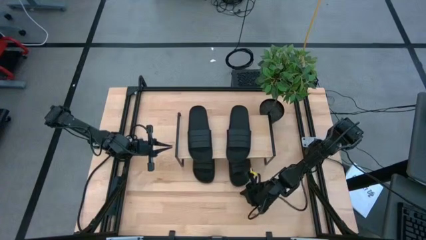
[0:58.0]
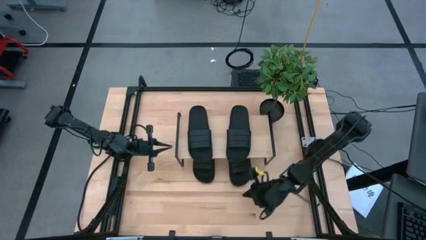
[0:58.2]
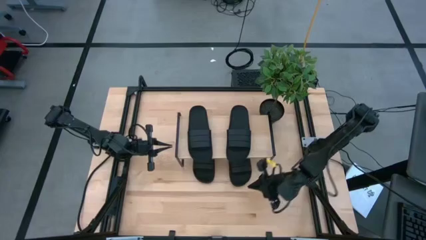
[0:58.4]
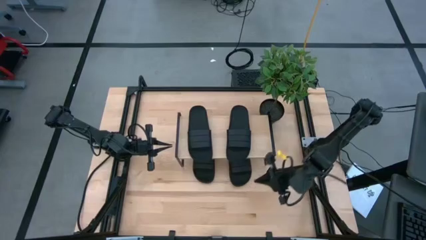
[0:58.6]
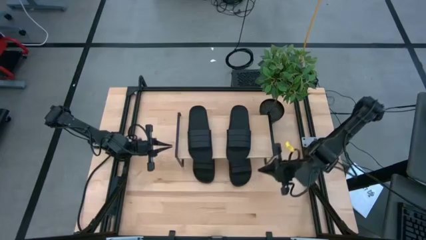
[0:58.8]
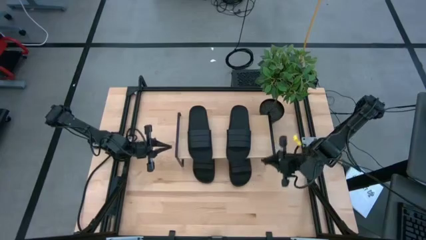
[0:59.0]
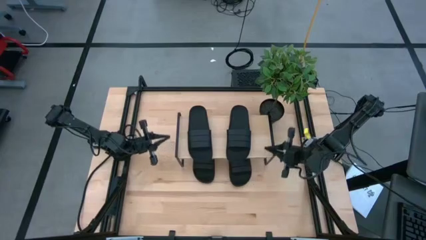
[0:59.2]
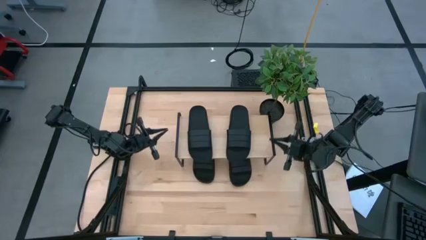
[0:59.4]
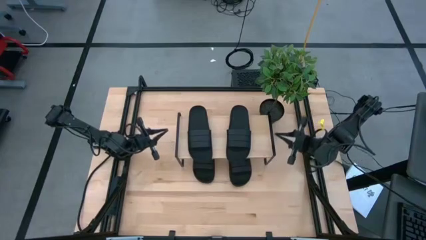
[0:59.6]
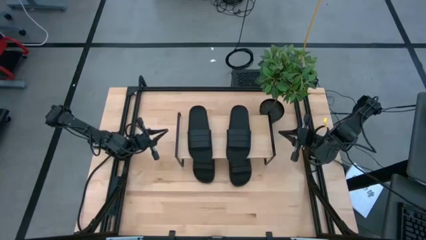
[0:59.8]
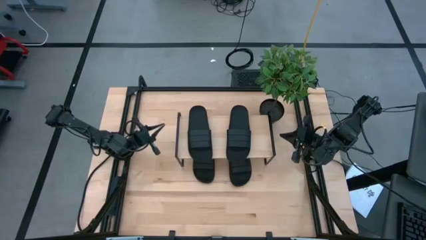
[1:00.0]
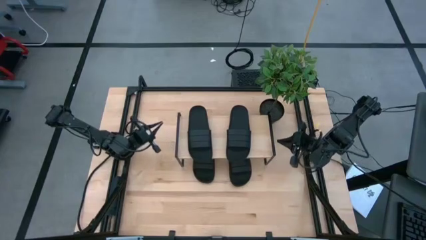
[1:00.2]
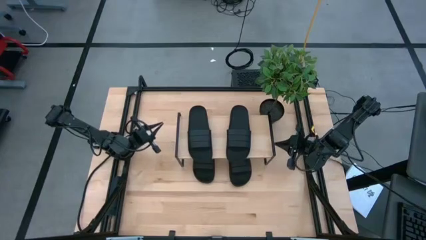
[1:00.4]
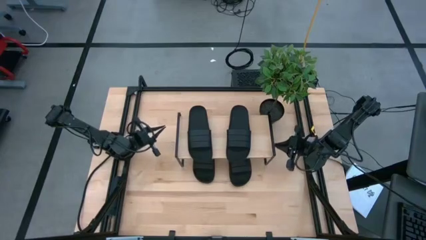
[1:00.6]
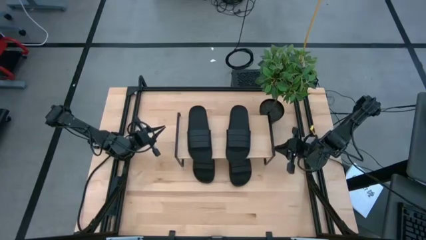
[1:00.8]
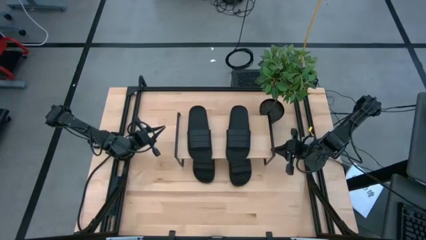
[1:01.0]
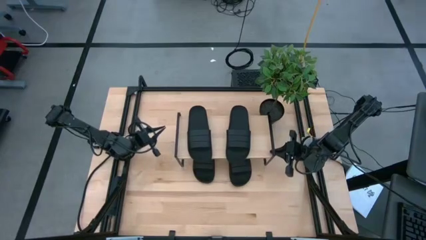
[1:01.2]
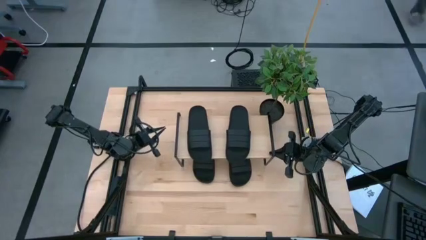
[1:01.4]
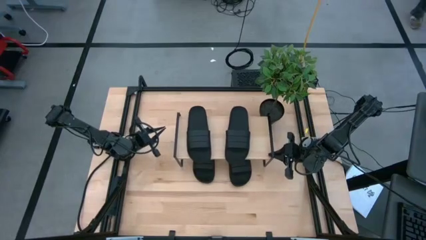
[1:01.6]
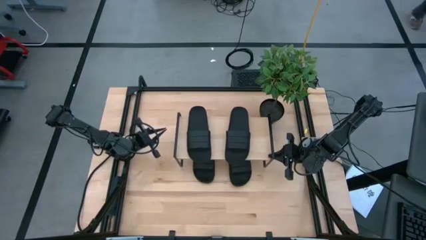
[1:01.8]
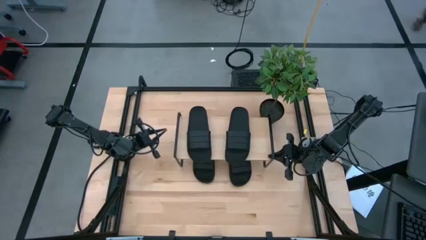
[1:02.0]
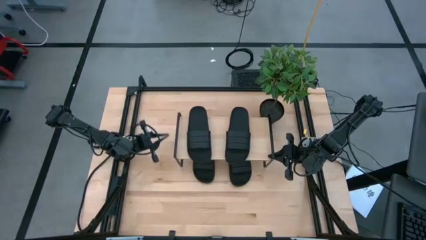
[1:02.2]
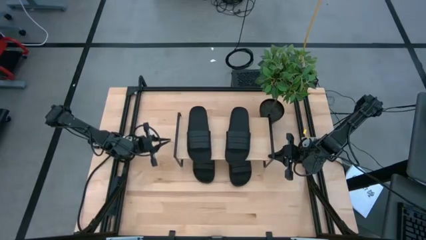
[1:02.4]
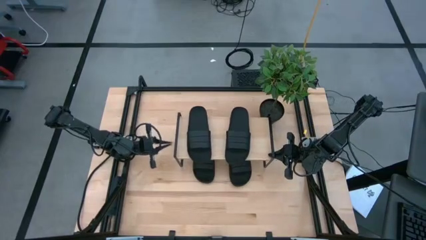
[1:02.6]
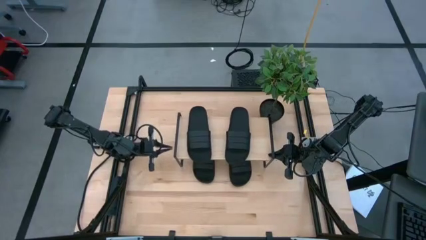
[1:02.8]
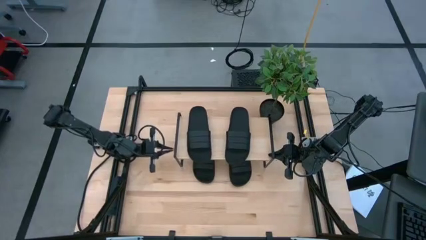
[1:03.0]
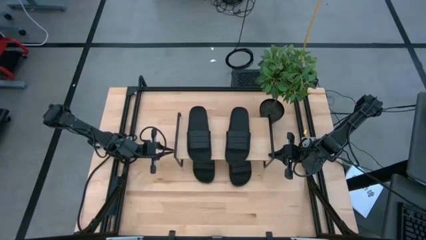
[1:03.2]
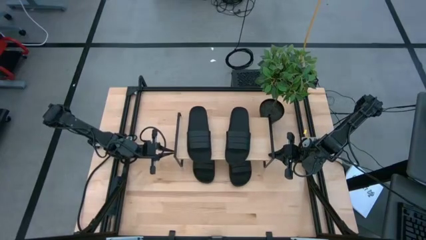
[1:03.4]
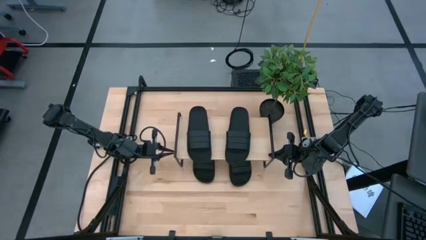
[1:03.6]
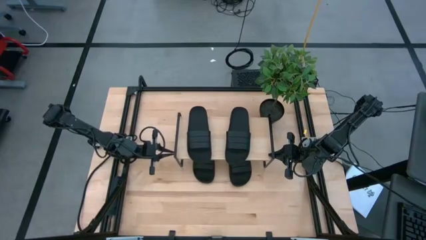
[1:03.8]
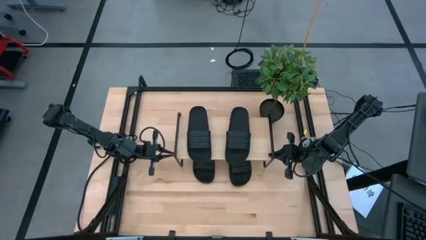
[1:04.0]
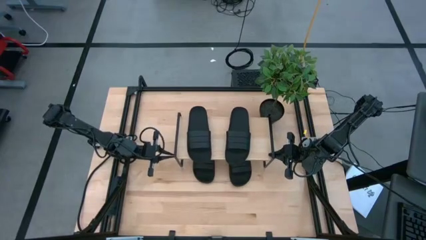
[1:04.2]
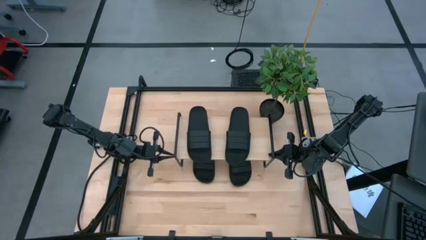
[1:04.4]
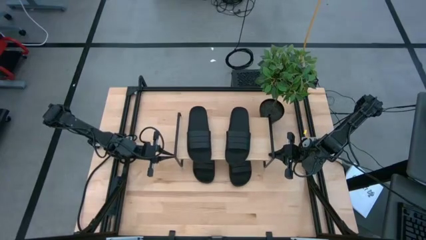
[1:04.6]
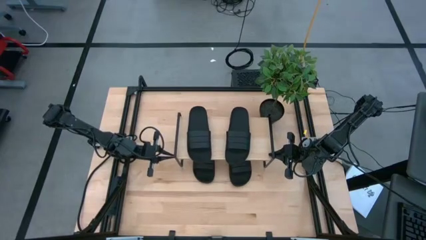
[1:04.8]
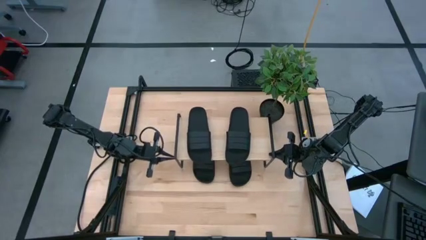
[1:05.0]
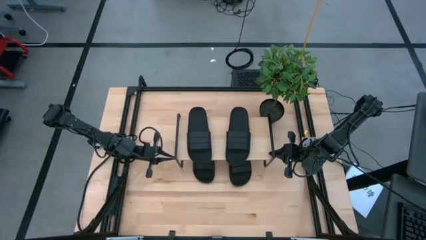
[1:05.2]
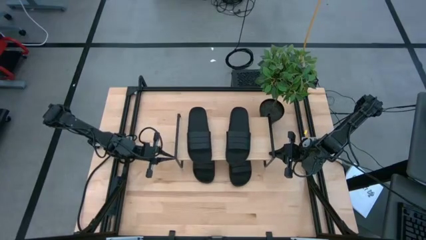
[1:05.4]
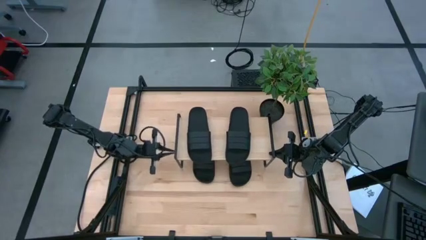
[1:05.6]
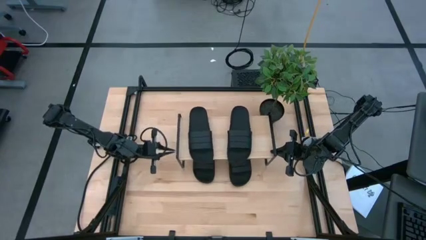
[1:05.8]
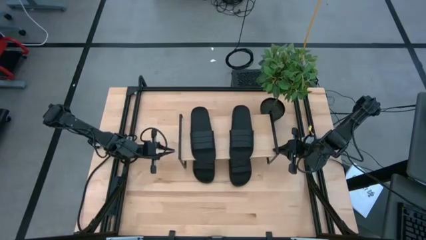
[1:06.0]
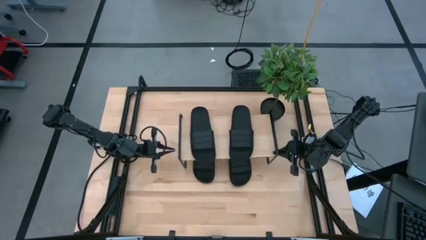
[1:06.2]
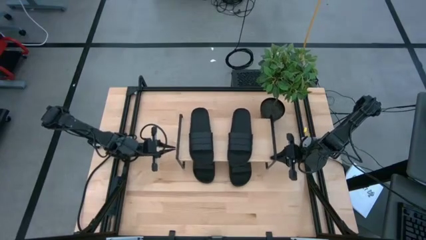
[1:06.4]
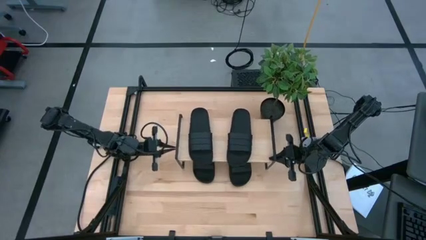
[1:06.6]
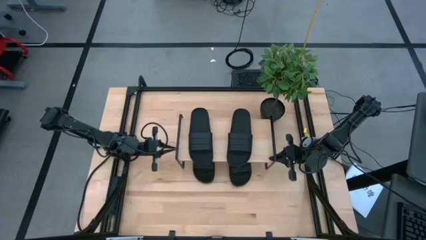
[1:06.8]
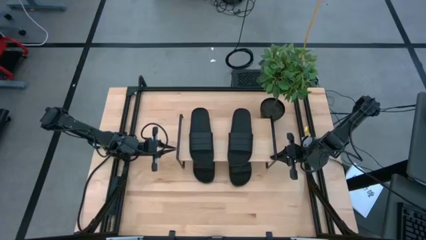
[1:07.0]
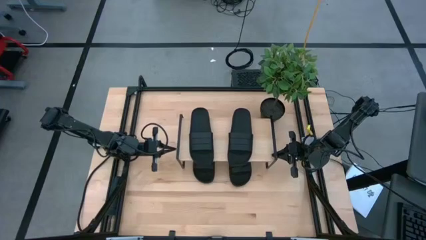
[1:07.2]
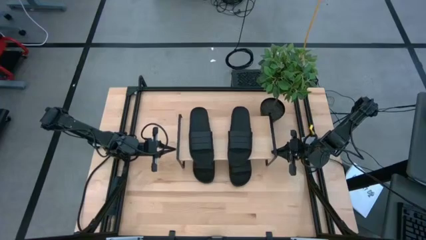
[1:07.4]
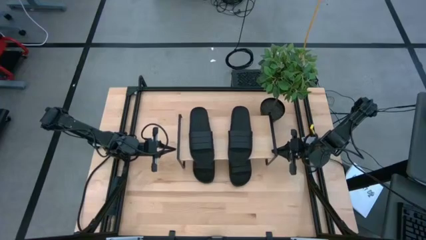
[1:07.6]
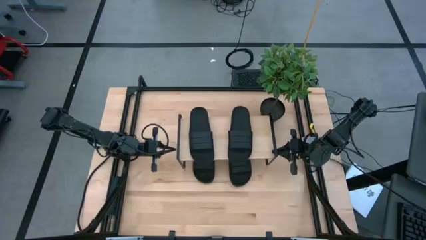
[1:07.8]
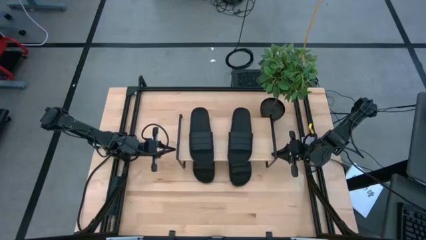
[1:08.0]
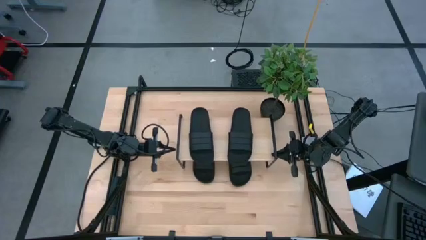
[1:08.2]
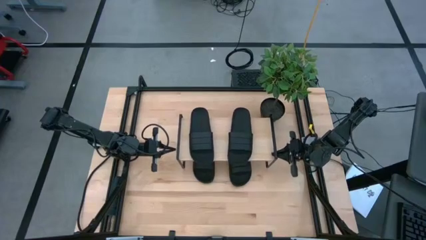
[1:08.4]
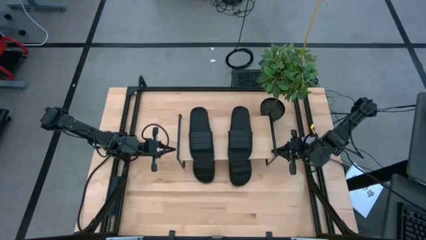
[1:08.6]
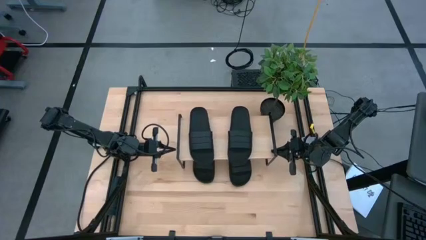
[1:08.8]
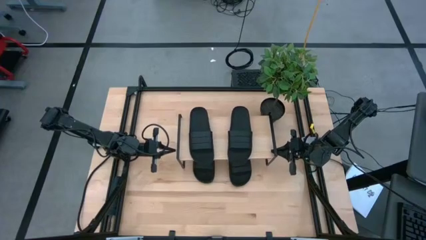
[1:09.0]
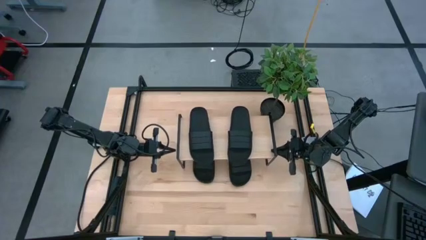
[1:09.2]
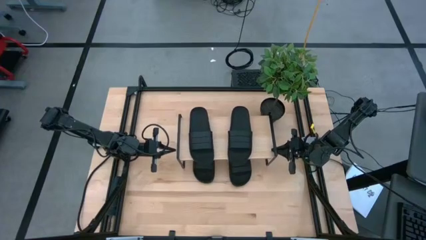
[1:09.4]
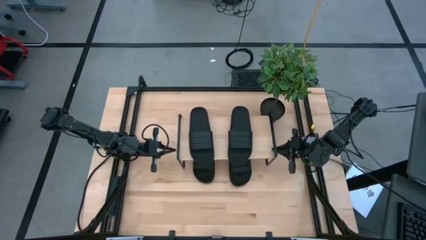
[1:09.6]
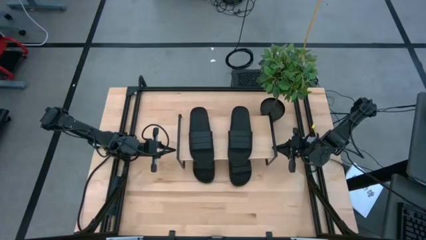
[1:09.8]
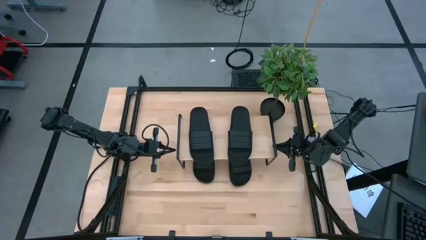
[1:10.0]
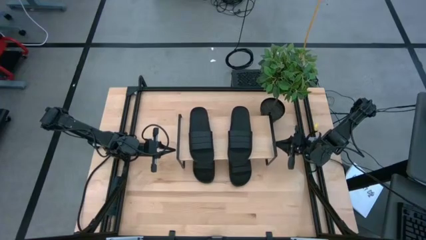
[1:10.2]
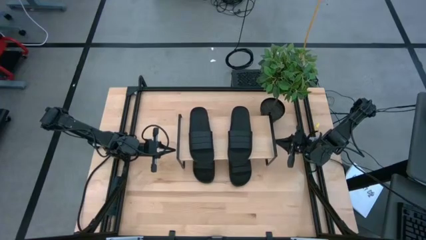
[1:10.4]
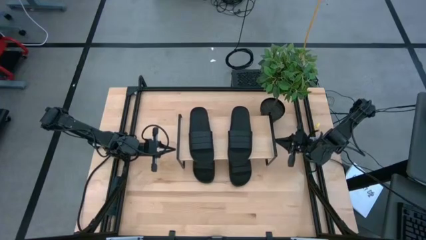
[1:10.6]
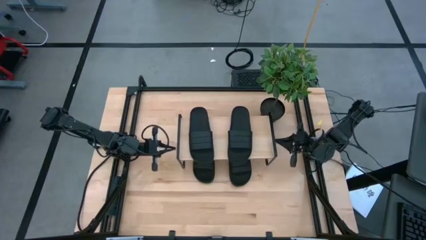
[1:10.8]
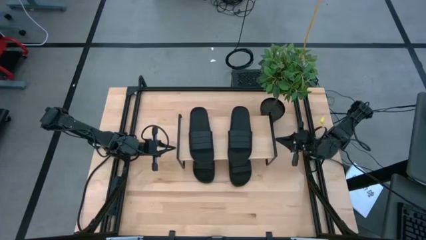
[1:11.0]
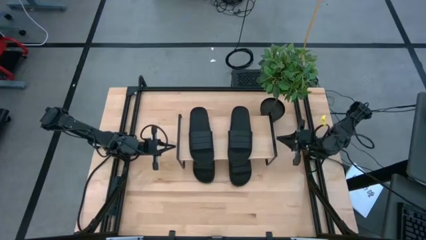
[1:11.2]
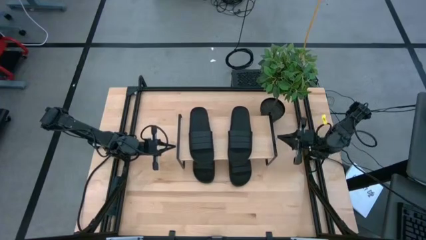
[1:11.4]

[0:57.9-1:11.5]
Task: Pick and place slides into the shelf
Adjust the shelf

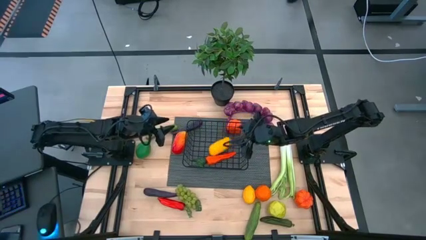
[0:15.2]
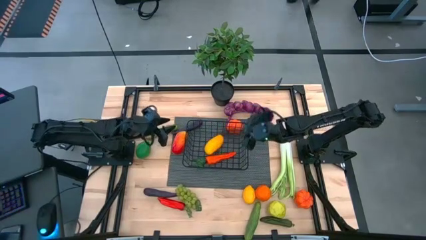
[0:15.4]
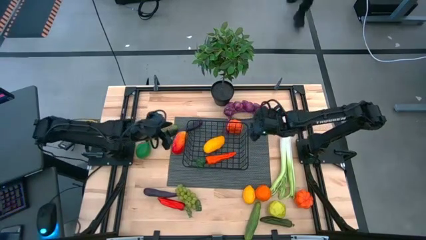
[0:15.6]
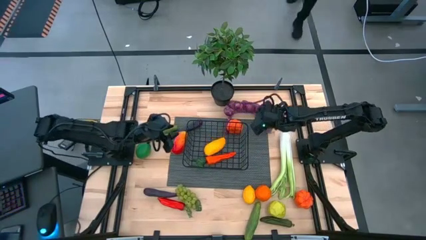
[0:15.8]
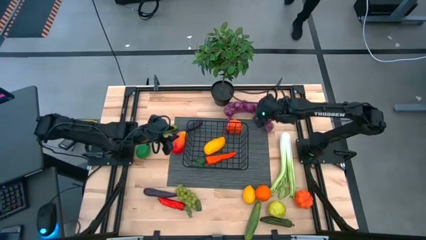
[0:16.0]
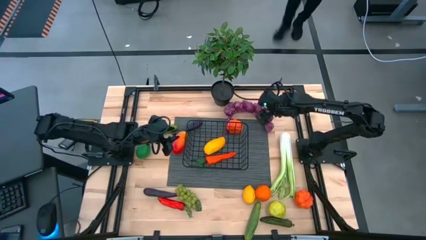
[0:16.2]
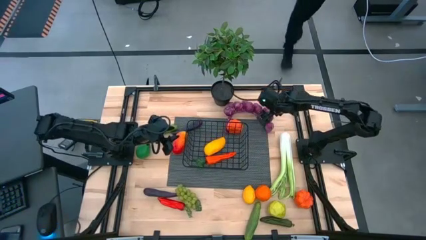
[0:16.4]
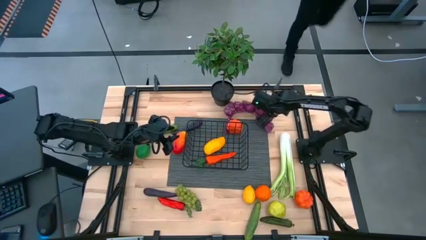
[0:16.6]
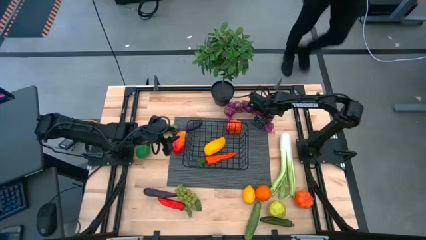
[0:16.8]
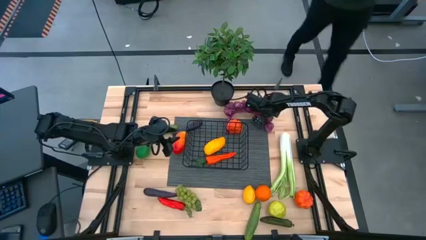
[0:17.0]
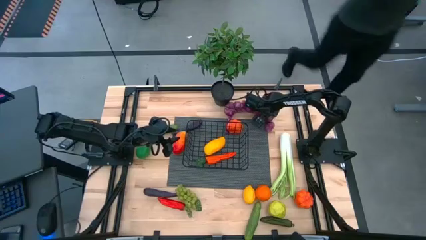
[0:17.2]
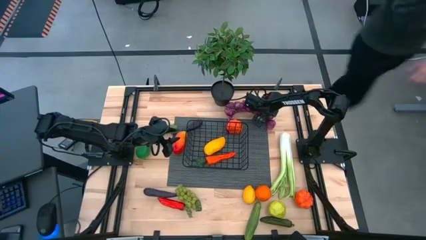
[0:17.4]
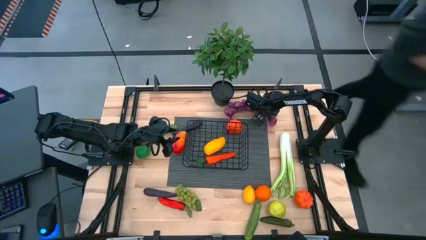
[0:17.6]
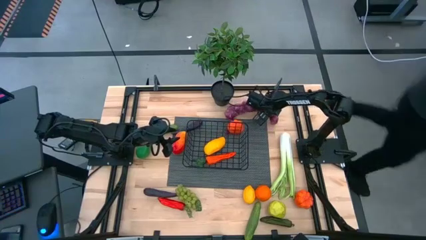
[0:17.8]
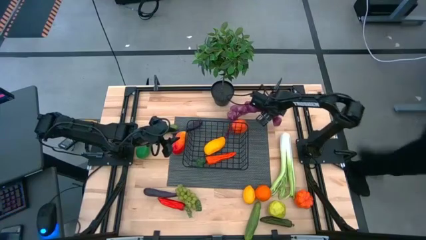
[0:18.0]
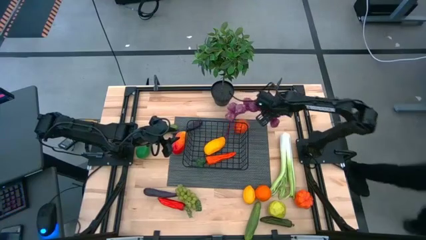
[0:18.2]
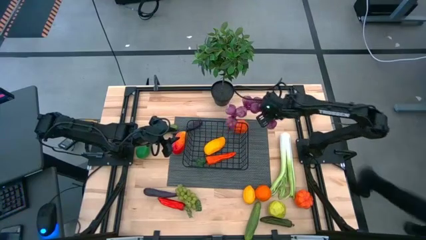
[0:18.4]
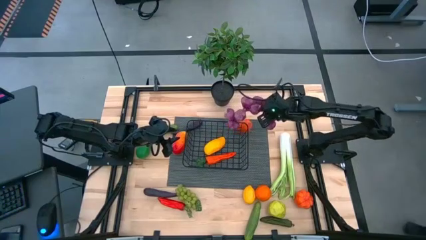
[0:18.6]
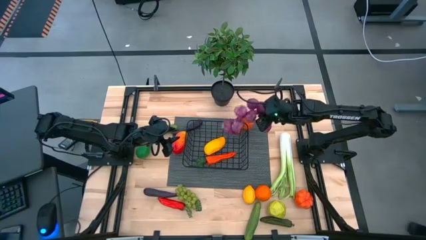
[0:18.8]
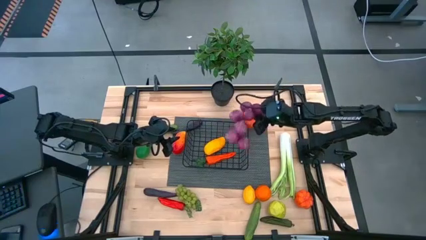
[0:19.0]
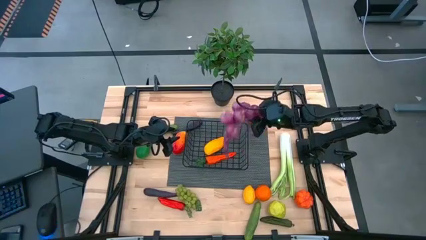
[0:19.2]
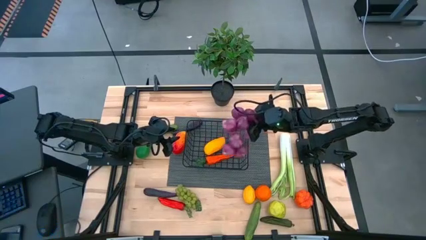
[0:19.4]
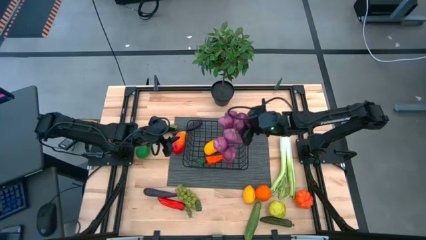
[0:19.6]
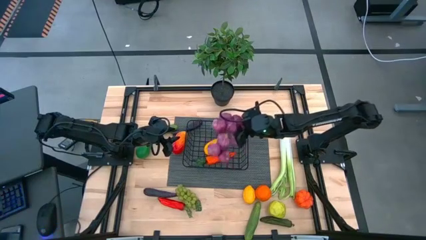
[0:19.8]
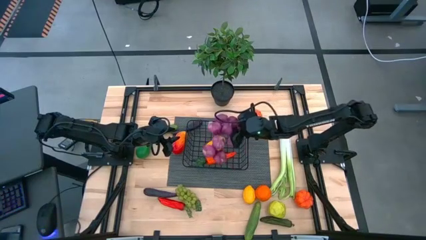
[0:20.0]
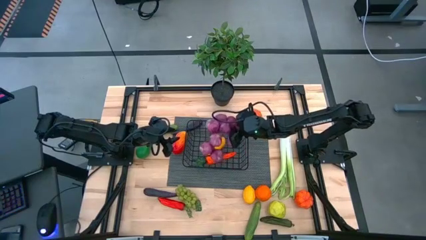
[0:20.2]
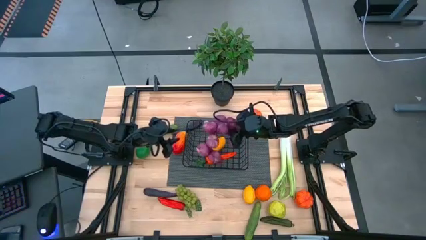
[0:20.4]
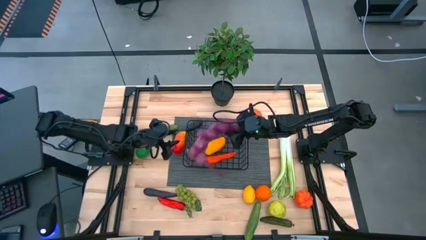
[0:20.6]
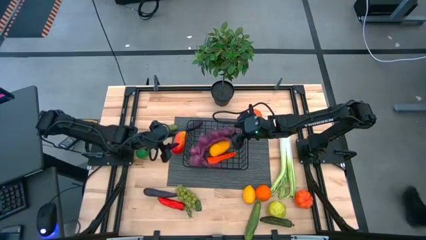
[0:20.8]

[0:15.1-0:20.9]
Task: Build produce basket
Put the purple garlic into the wire basket
